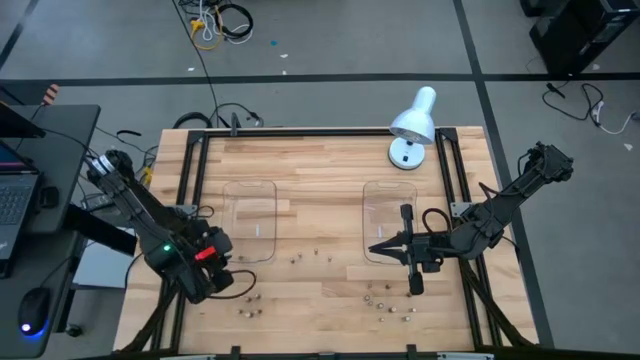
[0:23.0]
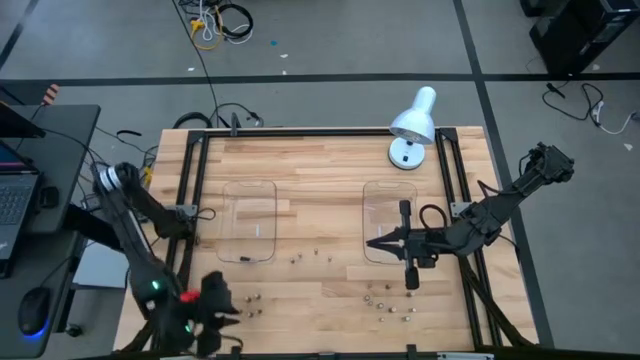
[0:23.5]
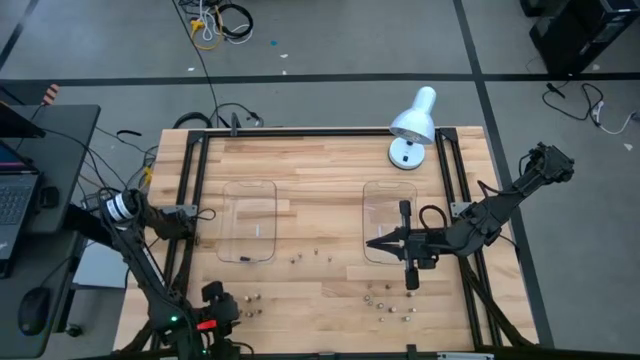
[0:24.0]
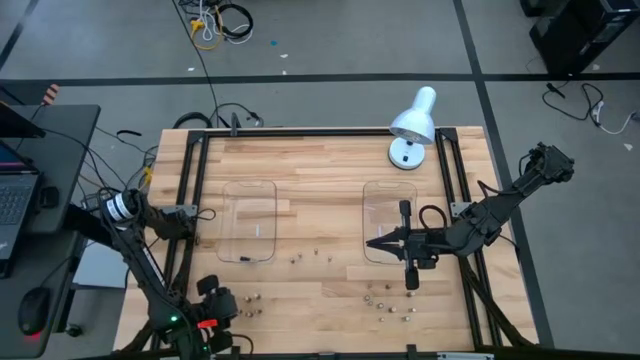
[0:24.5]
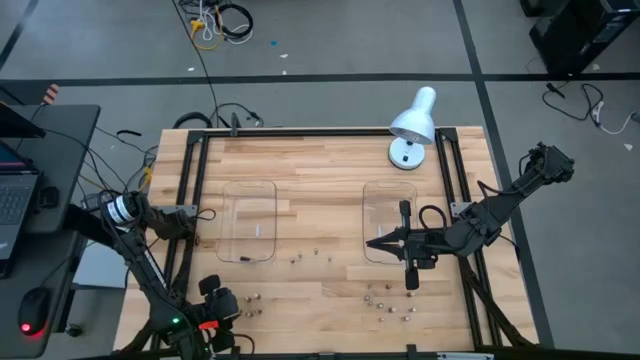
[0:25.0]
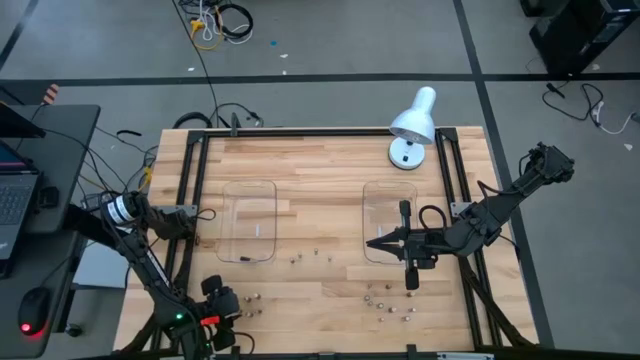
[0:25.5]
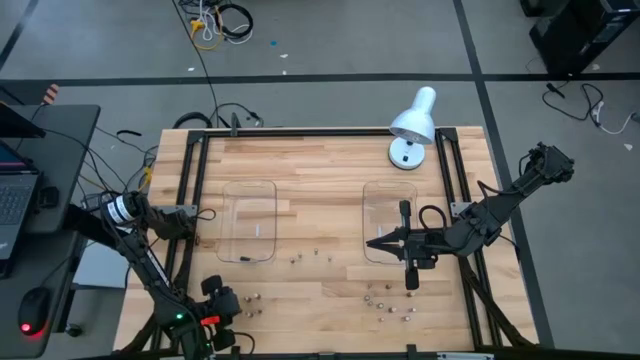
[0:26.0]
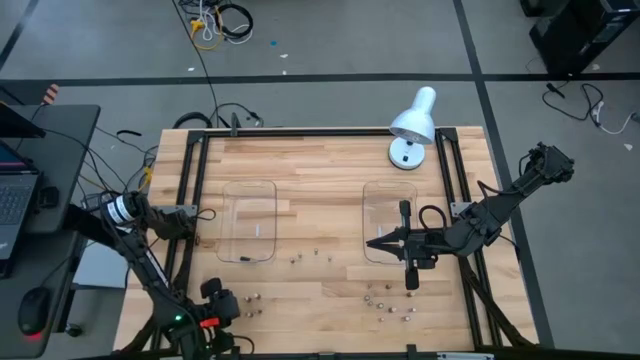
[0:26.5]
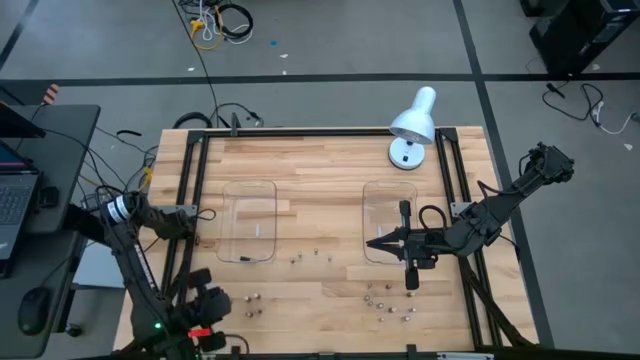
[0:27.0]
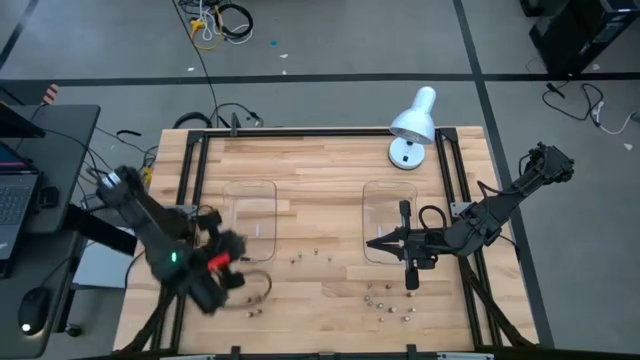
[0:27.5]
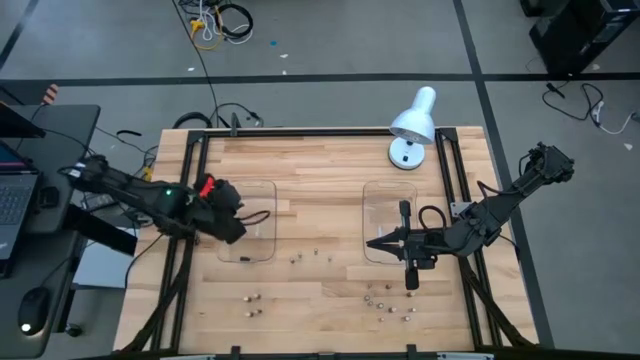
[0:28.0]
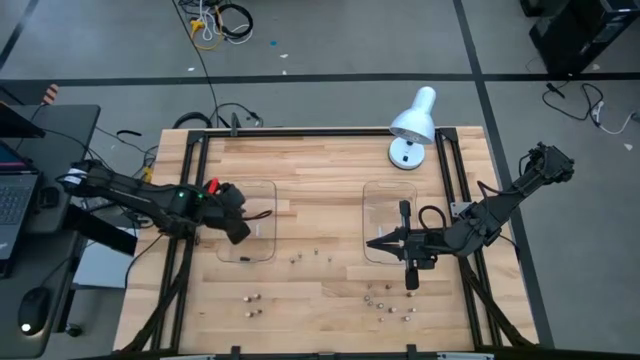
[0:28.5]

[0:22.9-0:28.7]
Task: Sort batteries
Put the black battery into the left transparent bin

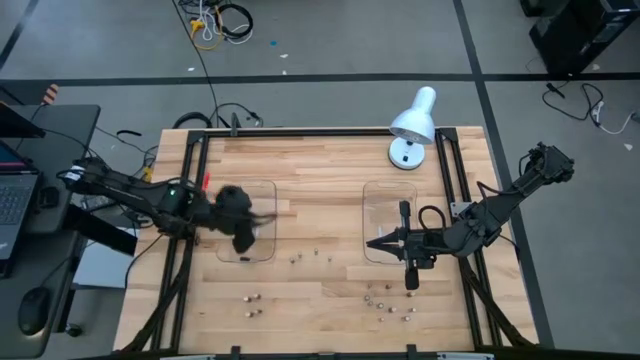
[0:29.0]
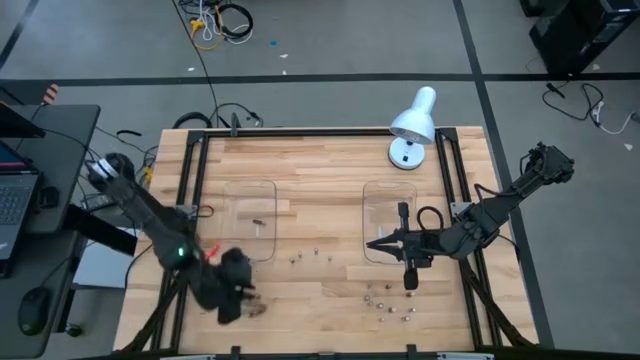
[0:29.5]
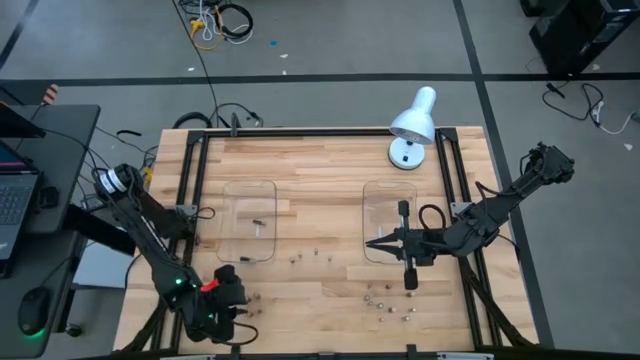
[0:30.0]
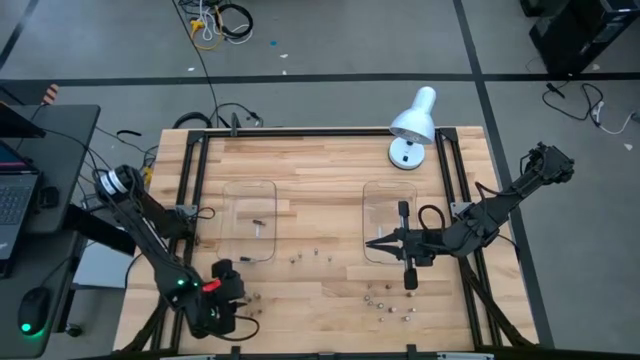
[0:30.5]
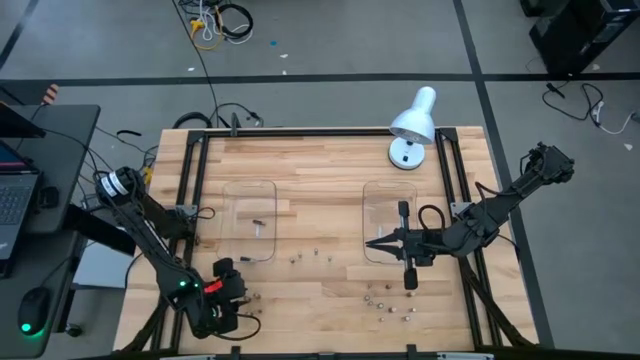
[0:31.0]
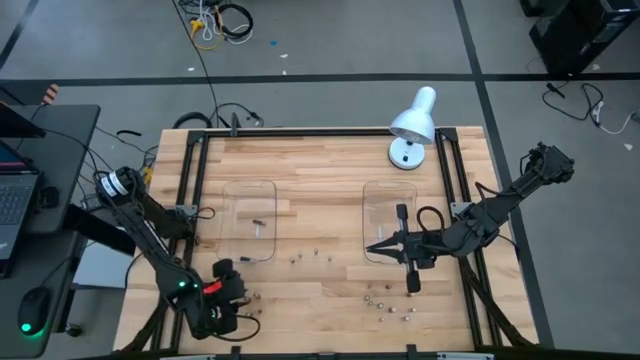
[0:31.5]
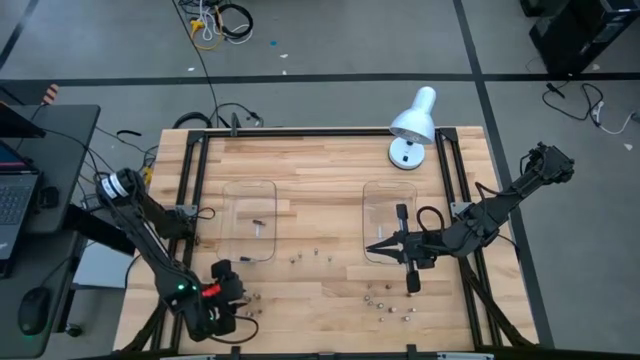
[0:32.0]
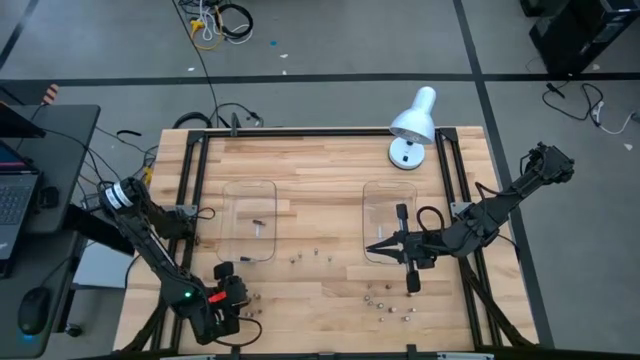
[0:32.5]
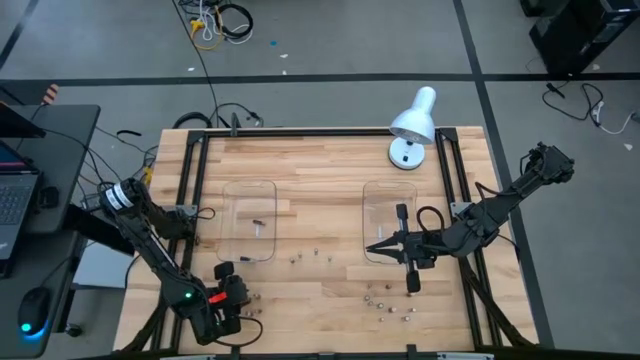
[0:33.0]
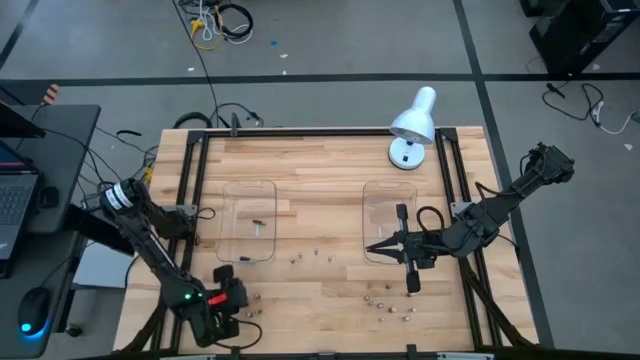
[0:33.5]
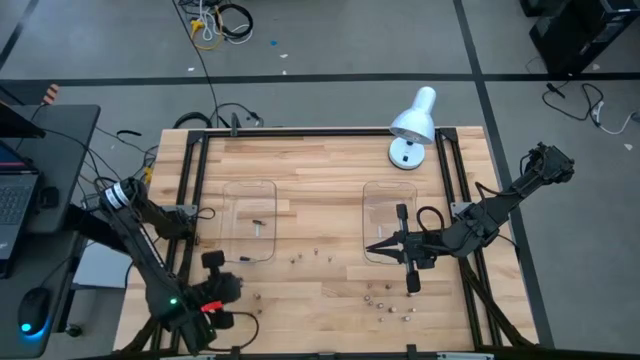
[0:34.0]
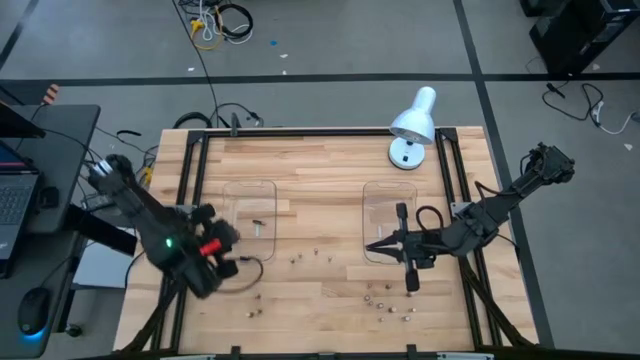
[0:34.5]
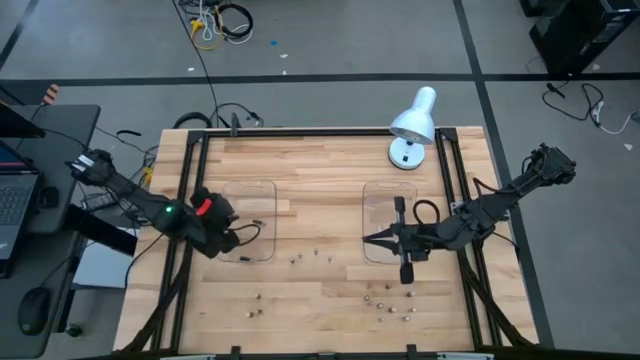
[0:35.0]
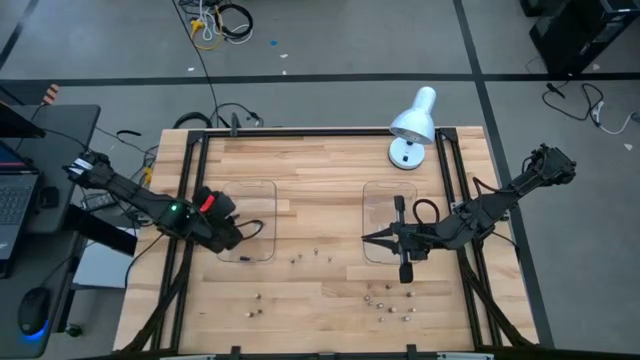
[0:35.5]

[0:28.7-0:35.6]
Put the black battery into the left transparent bin

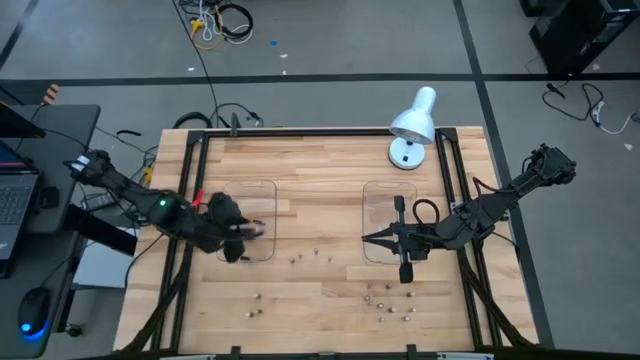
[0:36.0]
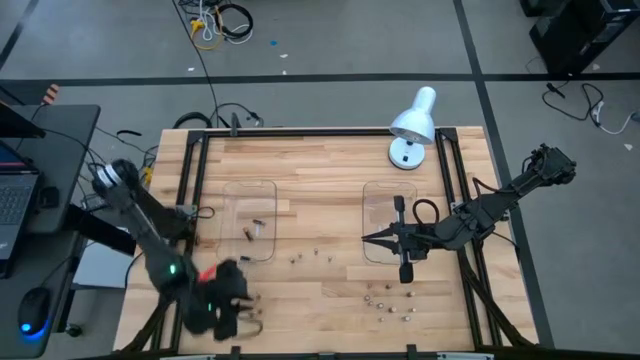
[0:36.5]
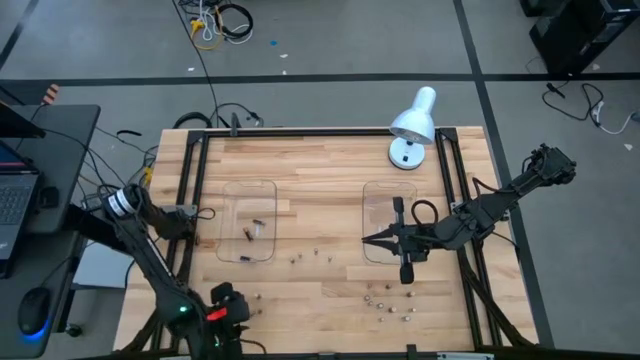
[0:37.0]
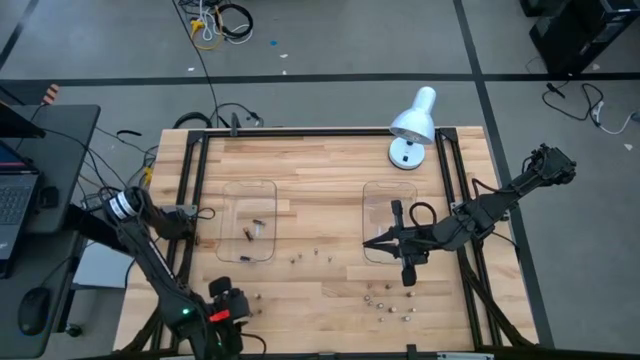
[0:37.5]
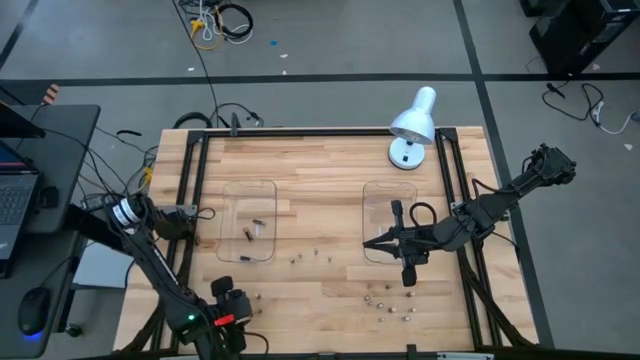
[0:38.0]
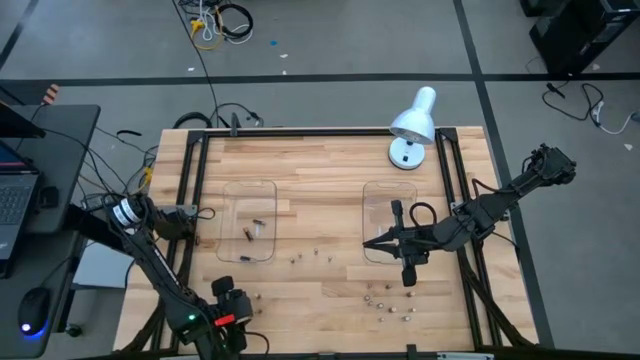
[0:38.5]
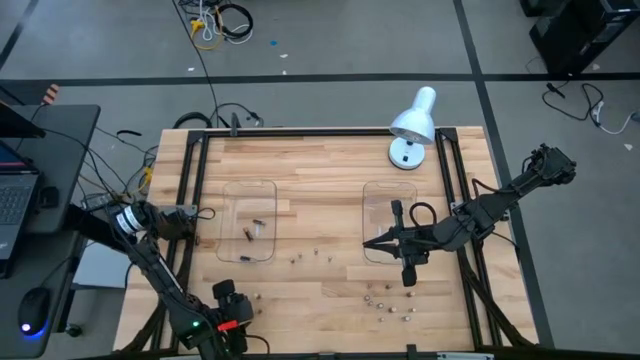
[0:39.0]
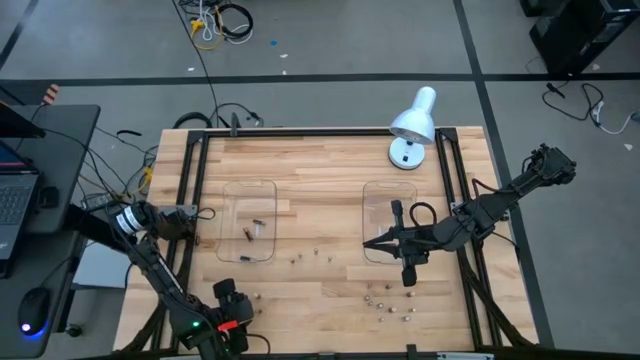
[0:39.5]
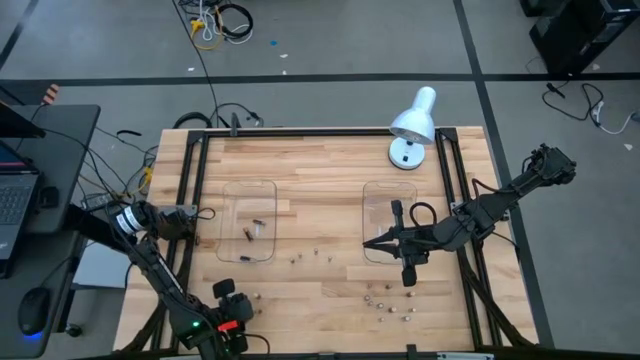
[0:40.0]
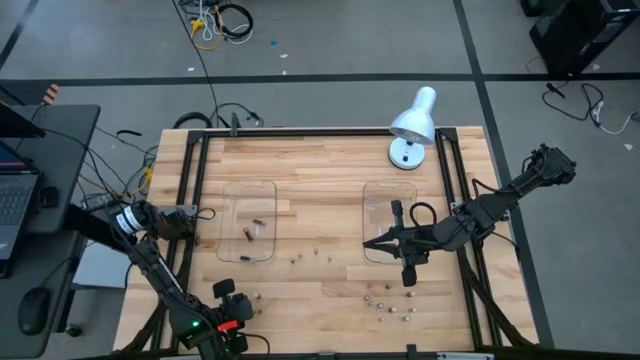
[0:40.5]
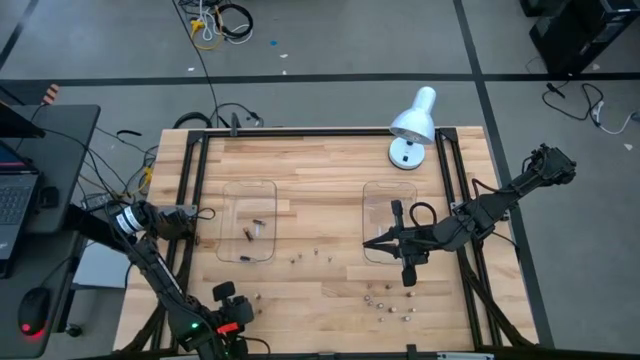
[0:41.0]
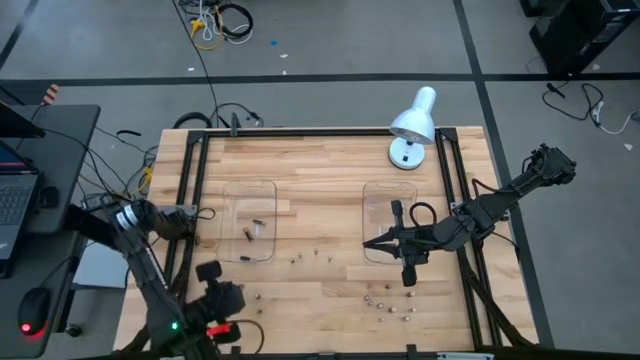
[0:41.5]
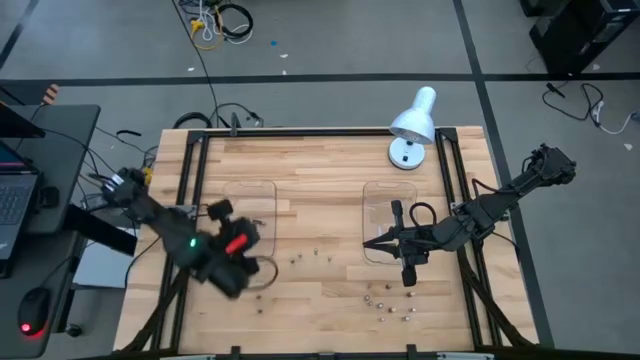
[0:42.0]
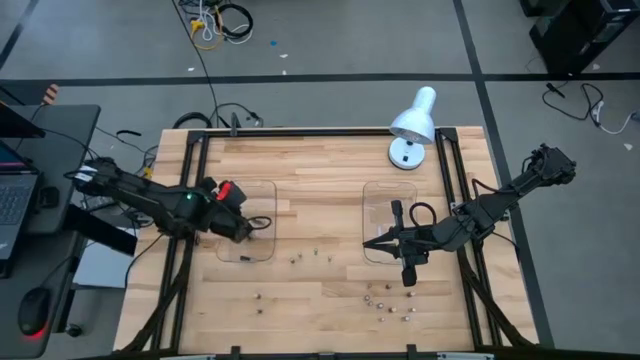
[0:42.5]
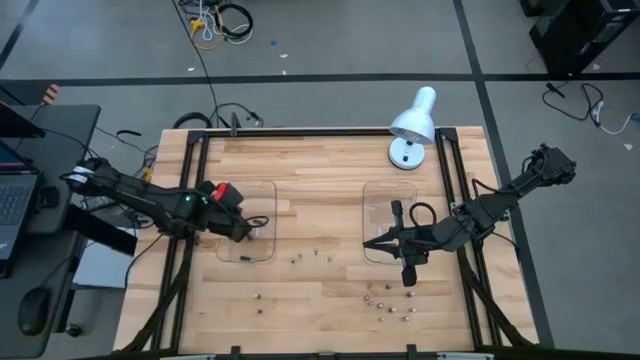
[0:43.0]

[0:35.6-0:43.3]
Put the black battery into the left transparent bin
